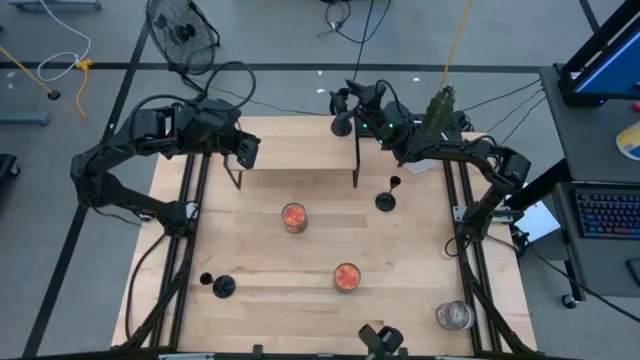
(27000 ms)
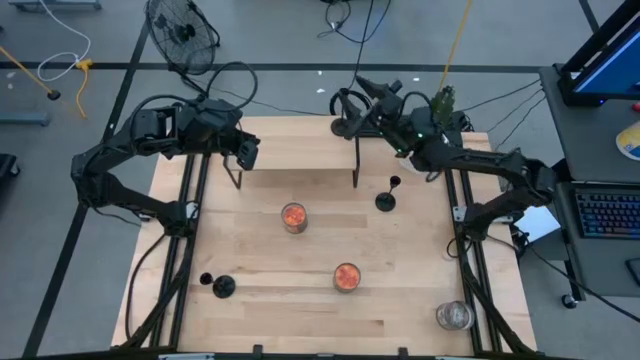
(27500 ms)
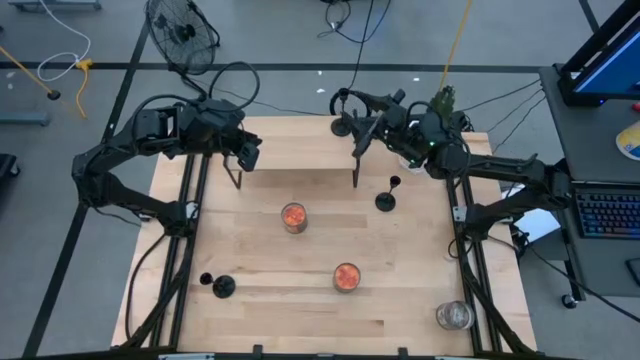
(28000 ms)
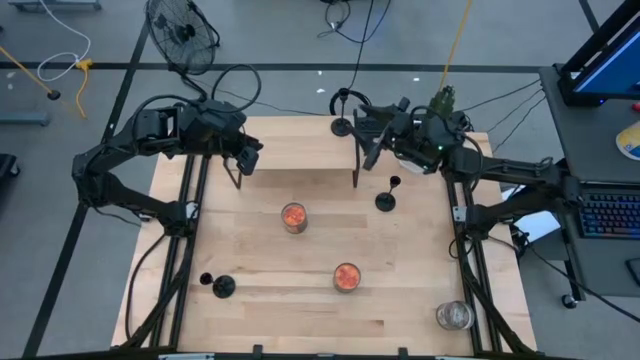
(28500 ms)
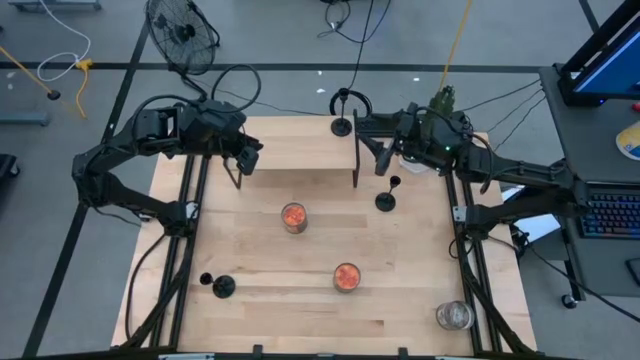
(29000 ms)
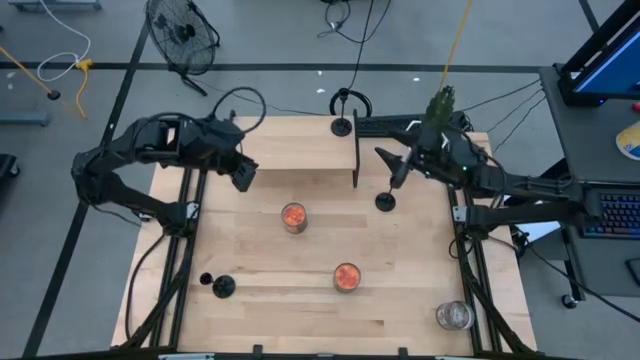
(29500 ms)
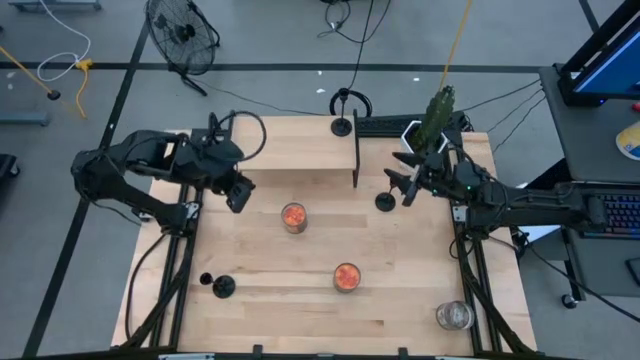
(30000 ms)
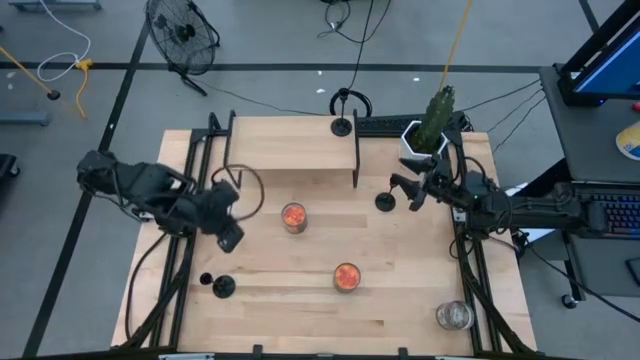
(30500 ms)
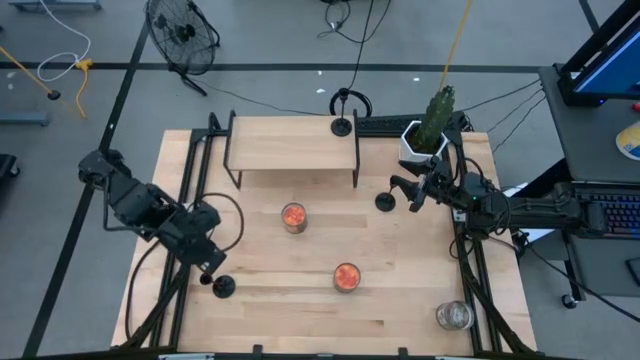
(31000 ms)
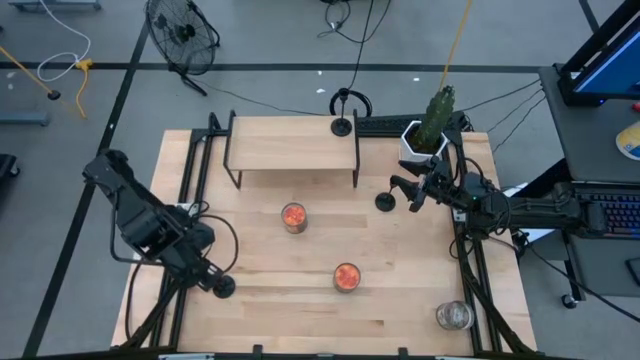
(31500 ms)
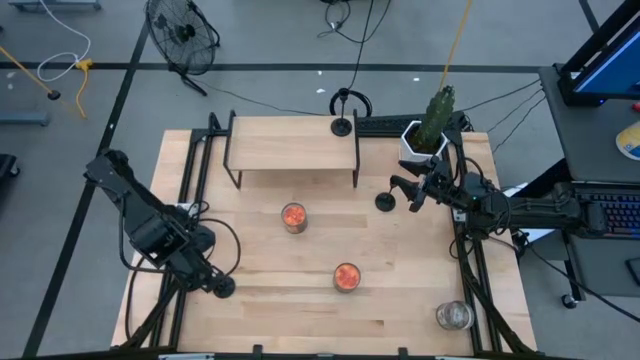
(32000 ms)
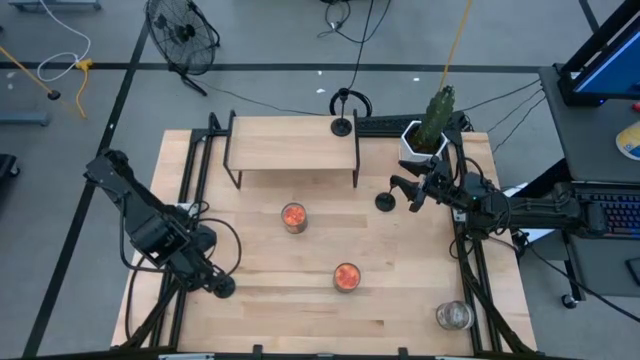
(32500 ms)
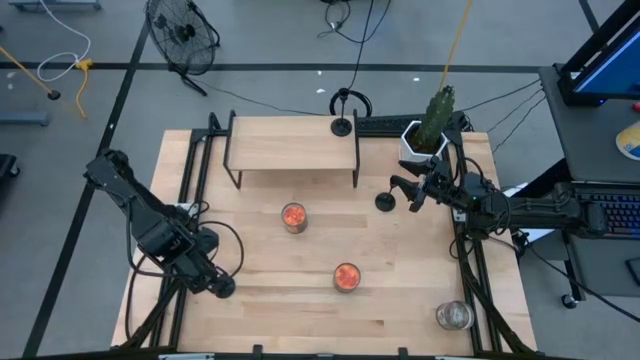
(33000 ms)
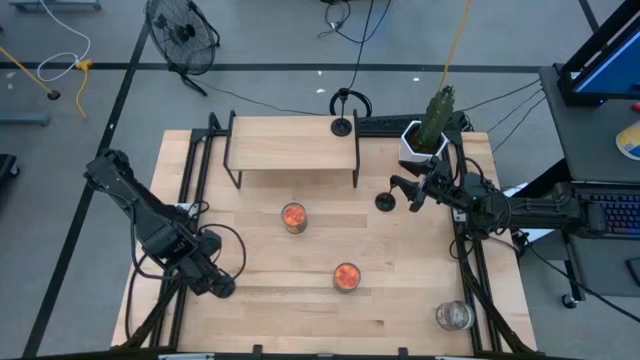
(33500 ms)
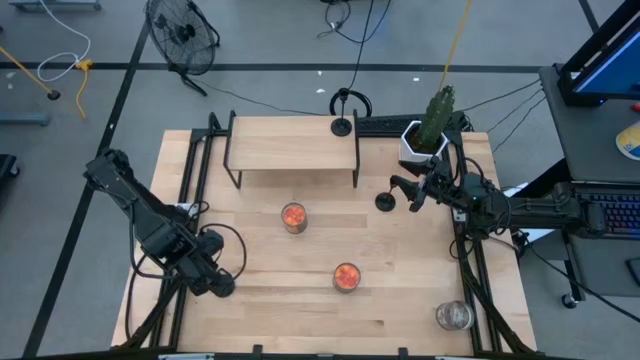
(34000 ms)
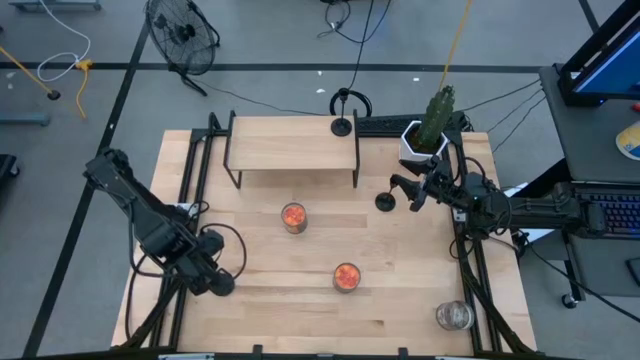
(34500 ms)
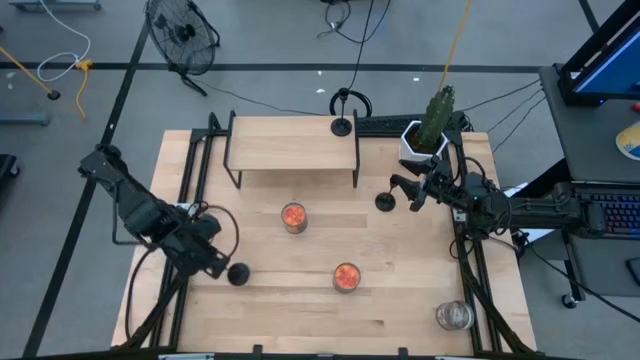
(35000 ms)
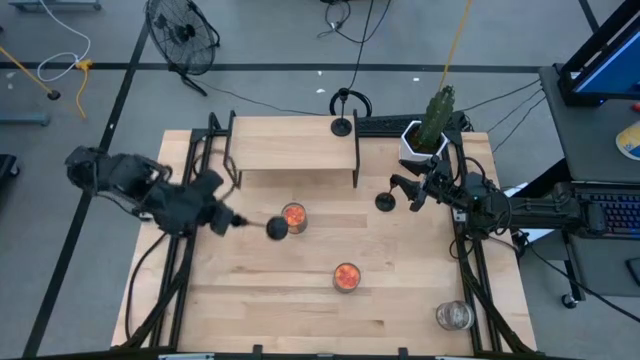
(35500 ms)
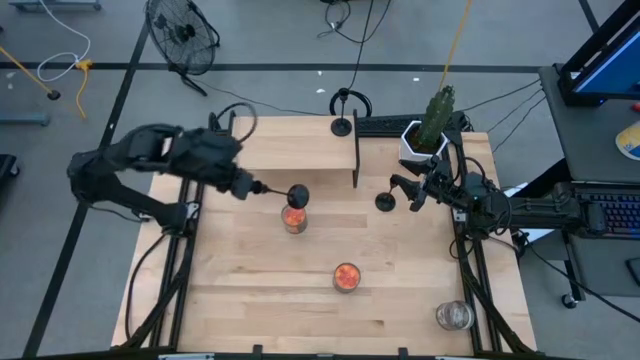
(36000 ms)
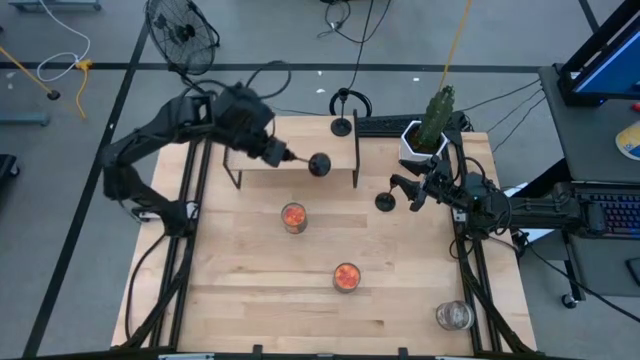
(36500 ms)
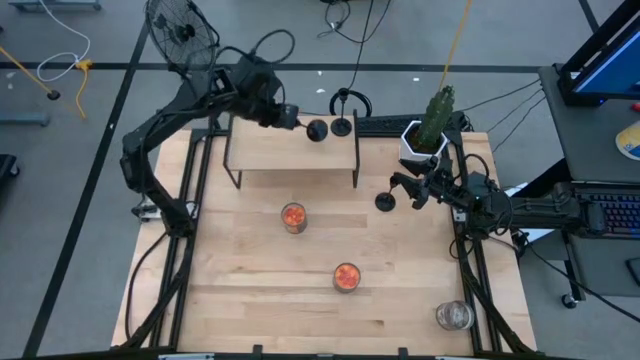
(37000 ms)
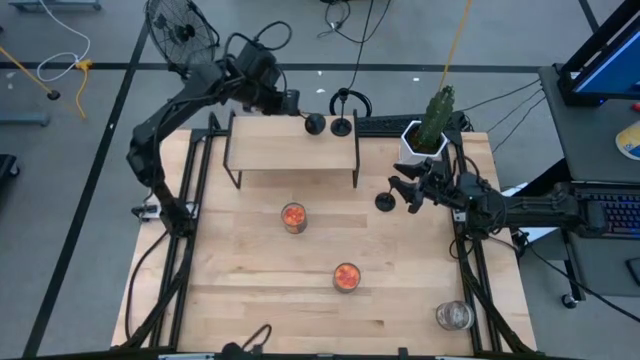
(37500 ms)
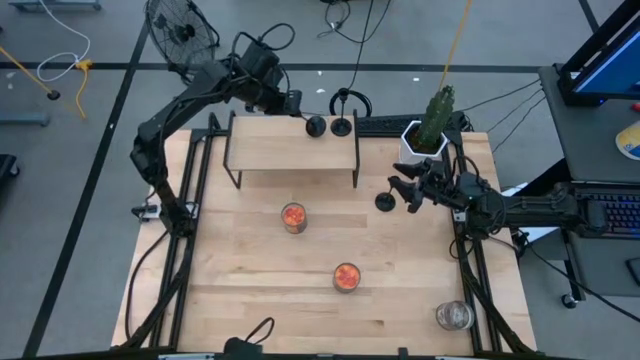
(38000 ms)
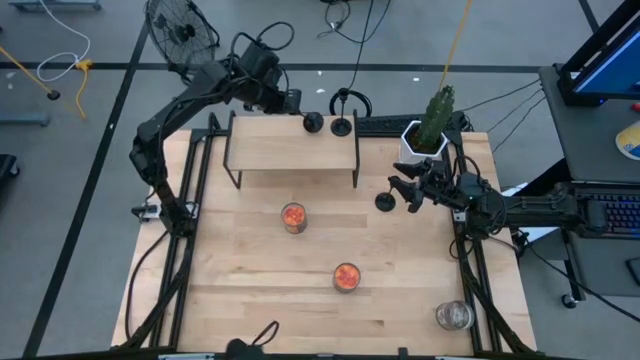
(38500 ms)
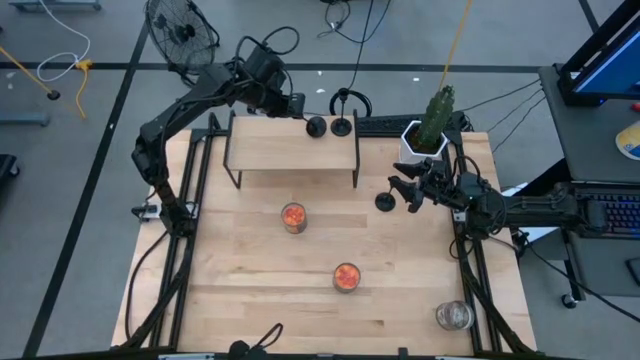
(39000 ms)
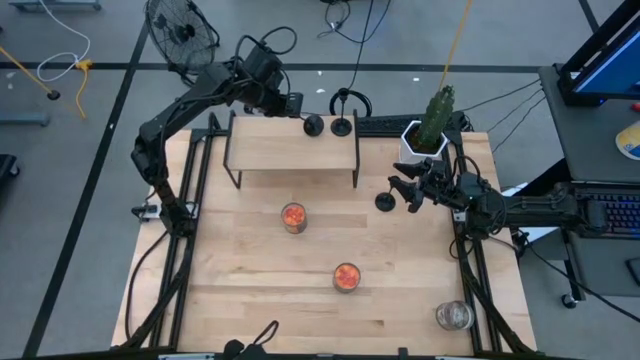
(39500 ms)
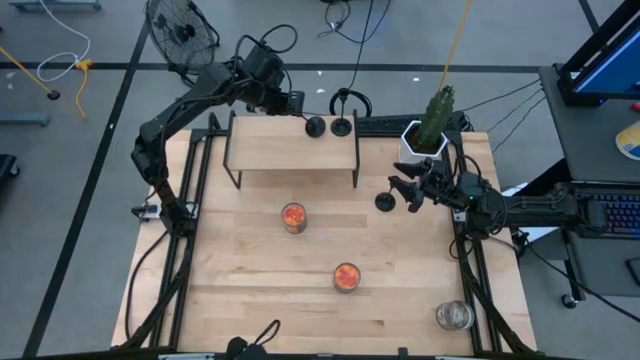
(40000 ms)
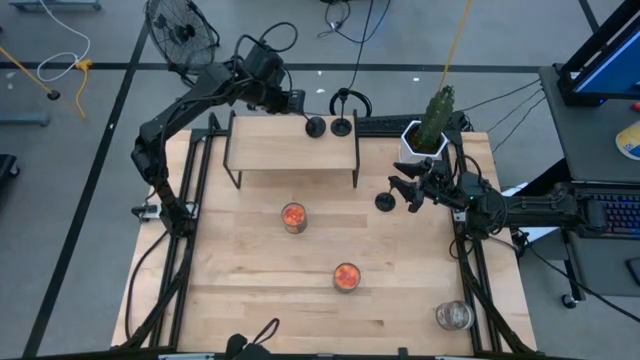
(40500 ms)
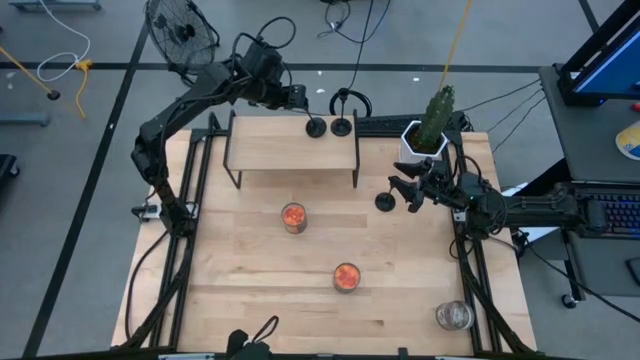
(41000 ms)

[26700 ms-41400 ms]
Task: Pick & Place candle stick holders
Put the bottom candle holder on the shelf

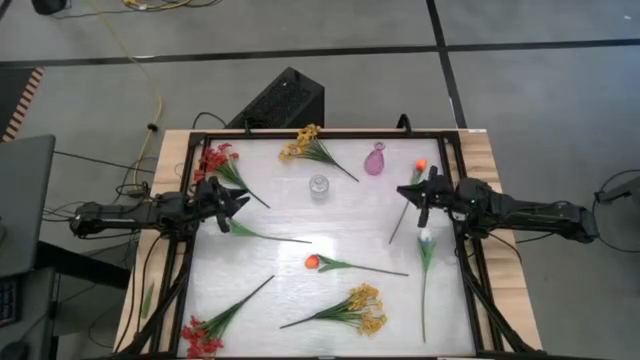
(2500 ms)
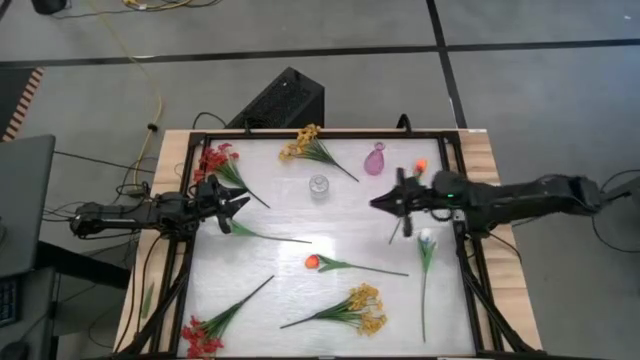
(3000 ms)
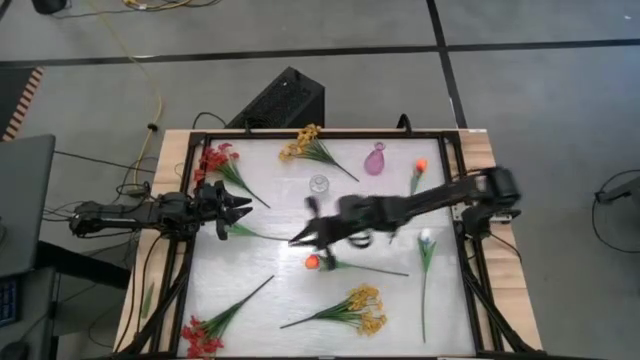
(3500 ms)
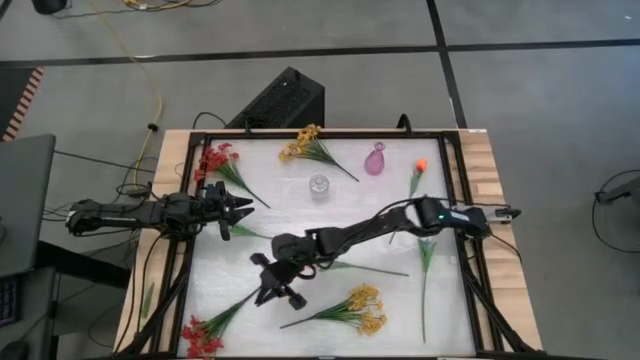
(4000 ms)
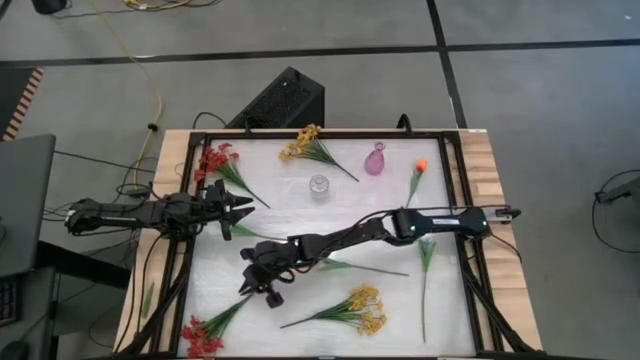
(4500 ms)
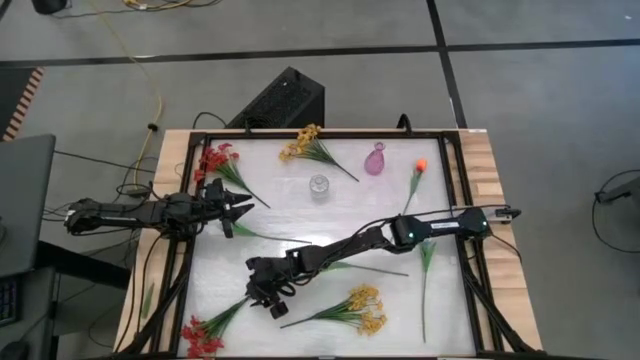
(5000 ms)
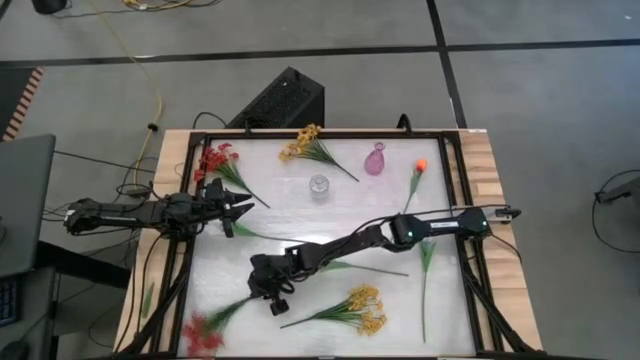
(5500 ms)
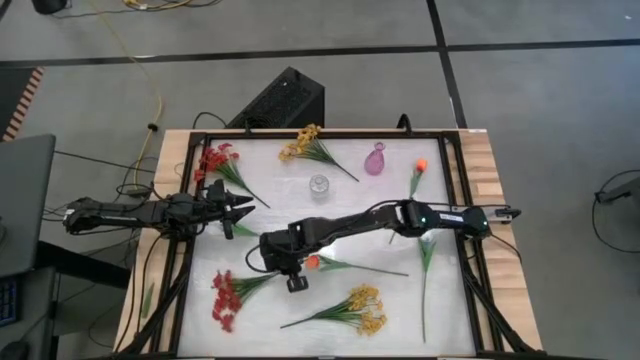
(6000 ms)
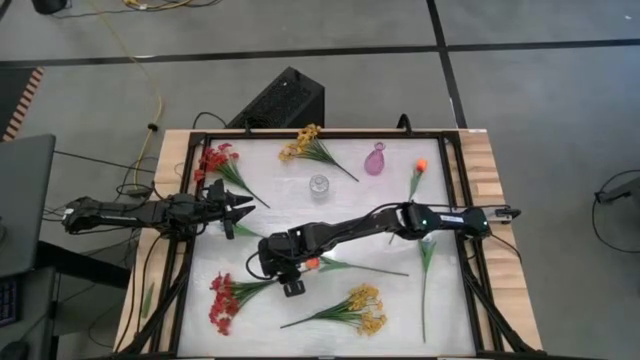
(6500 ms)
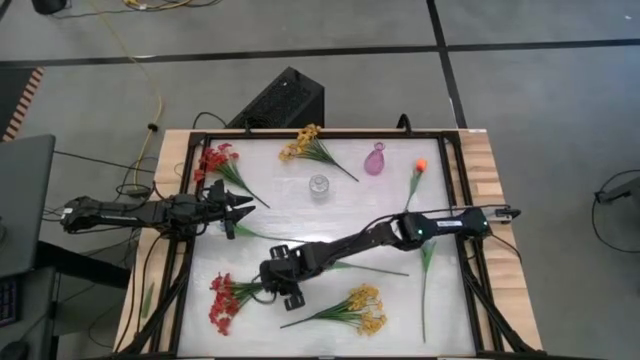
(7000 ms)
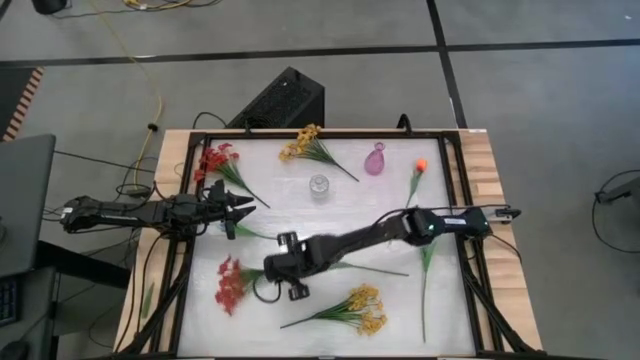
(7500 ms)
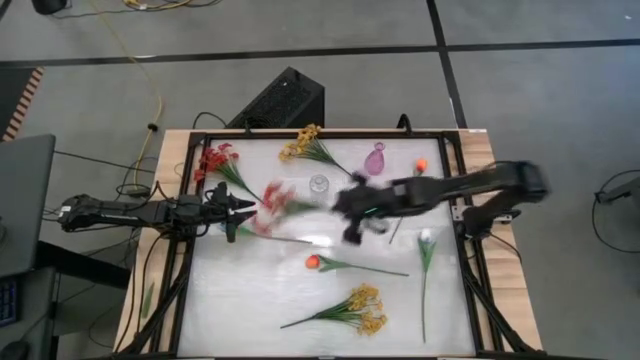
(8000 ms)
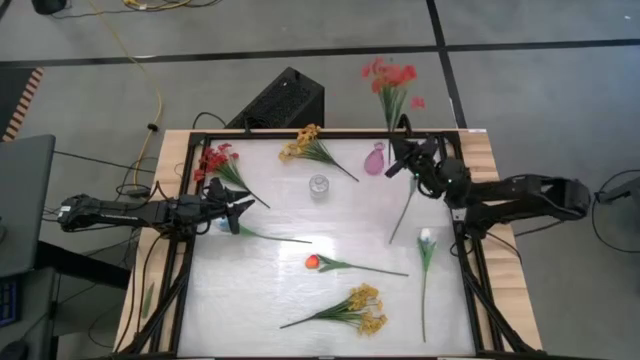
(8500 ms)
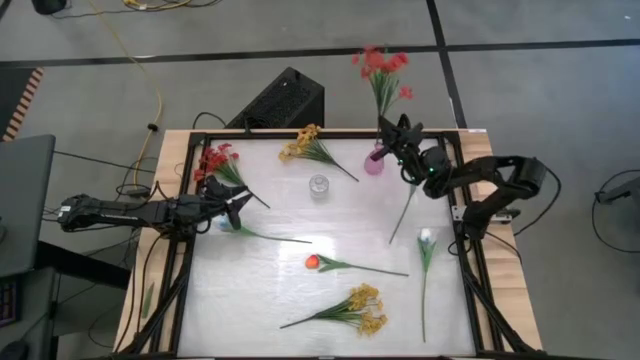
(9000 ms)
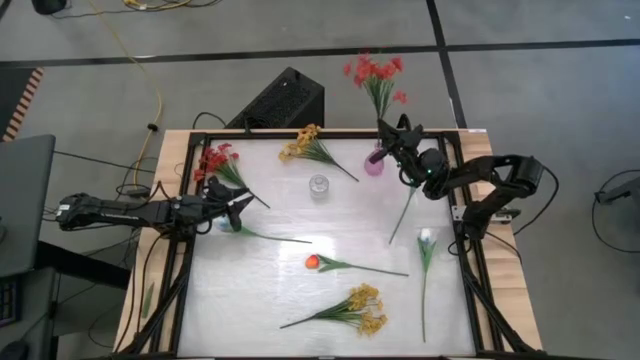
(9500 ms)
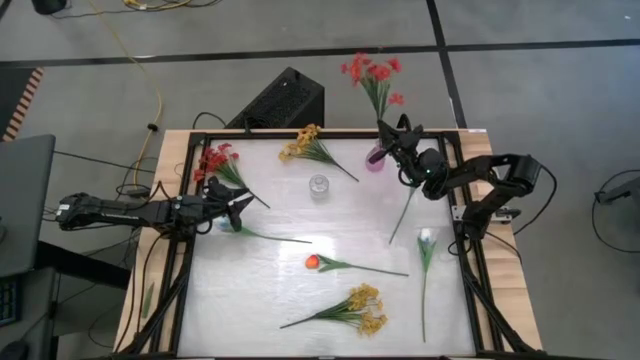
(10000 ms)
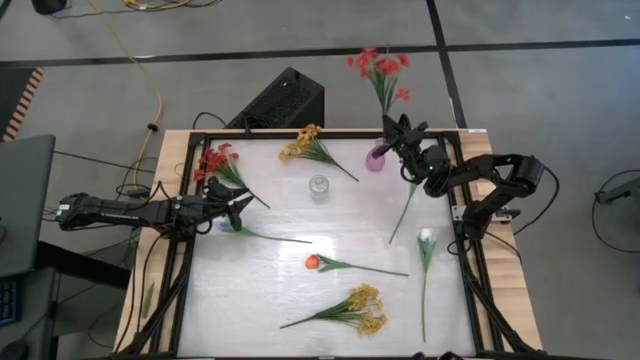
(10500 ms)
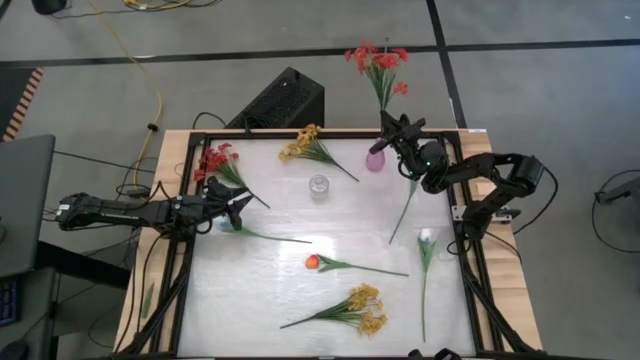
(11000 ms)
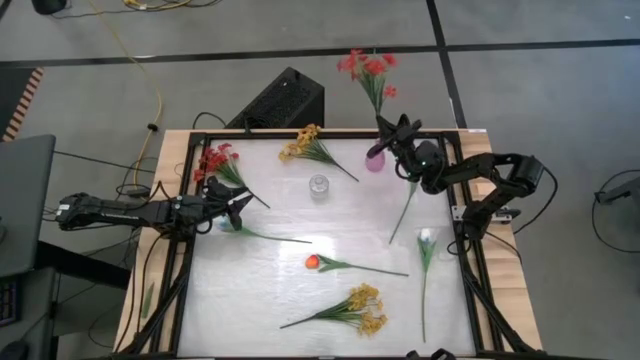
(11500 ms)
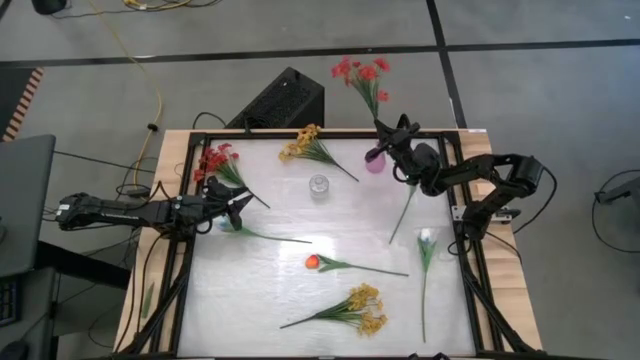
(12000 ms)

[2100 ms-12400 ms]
Task: Sort flowers into vase by color
Put the bottom red flower into the pink flower vase
